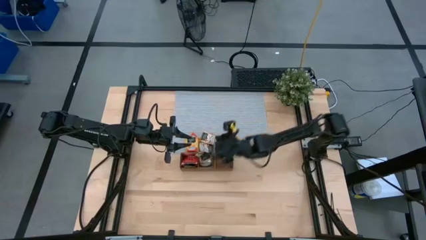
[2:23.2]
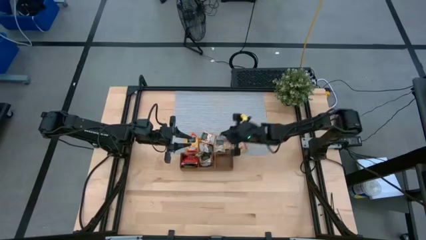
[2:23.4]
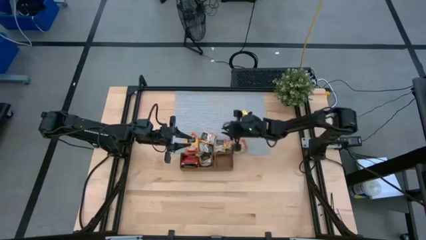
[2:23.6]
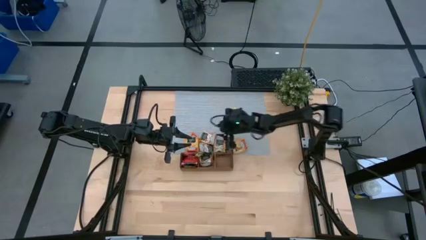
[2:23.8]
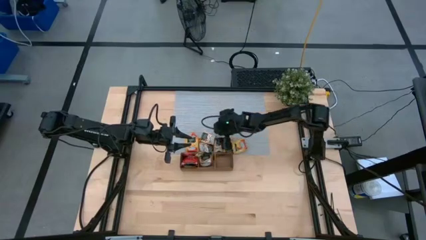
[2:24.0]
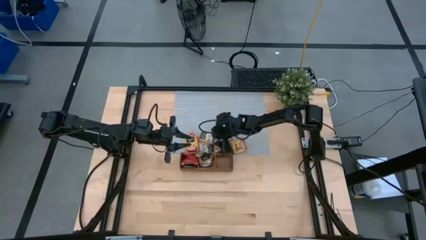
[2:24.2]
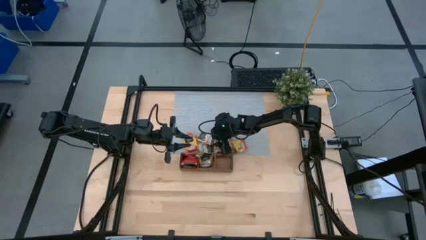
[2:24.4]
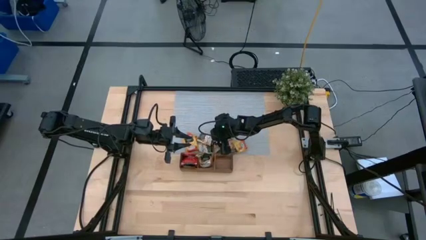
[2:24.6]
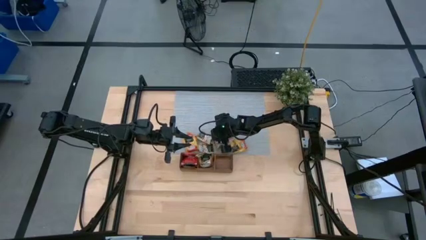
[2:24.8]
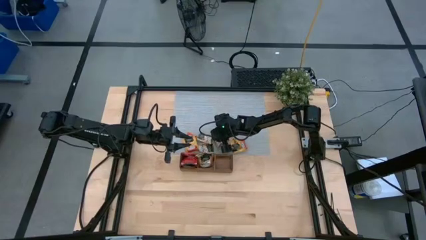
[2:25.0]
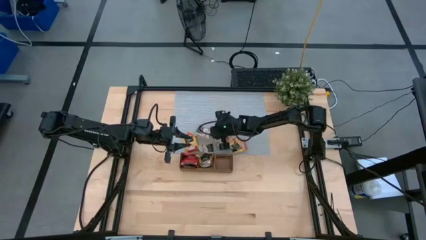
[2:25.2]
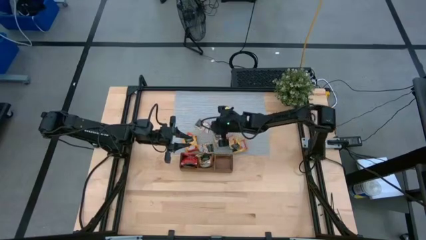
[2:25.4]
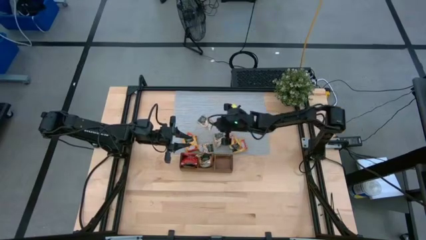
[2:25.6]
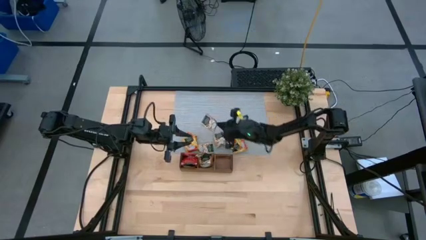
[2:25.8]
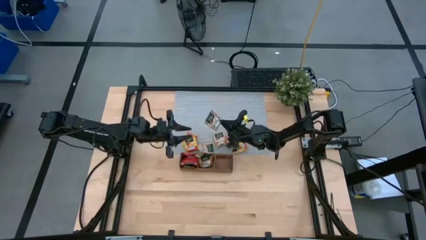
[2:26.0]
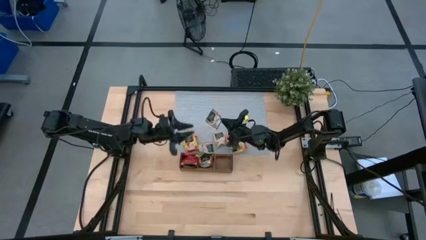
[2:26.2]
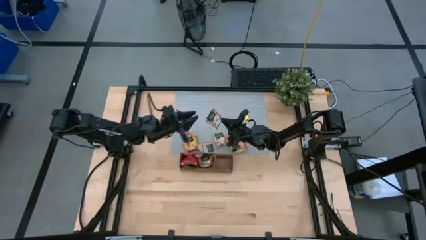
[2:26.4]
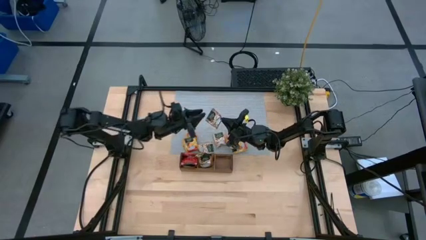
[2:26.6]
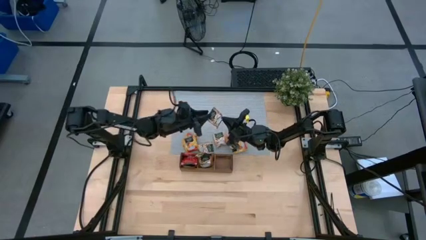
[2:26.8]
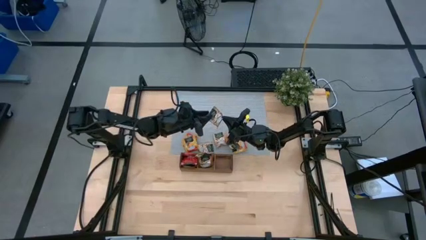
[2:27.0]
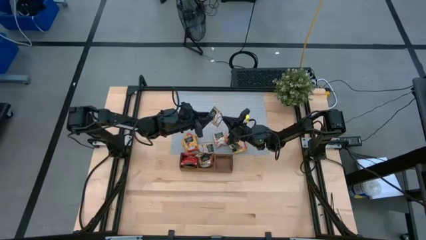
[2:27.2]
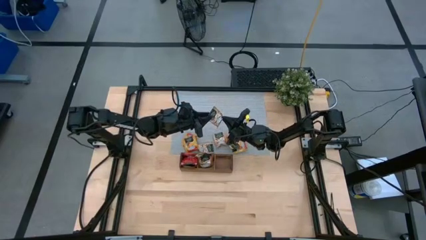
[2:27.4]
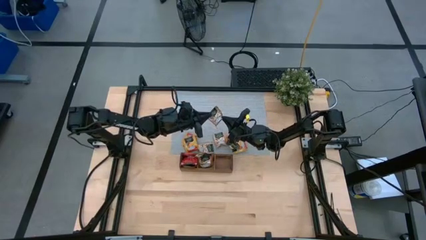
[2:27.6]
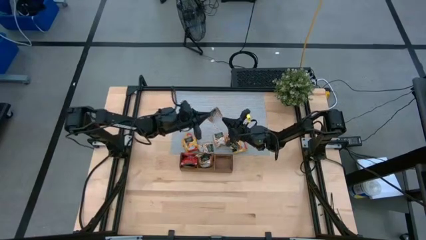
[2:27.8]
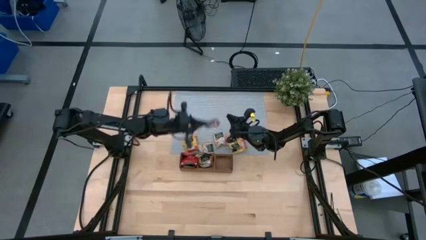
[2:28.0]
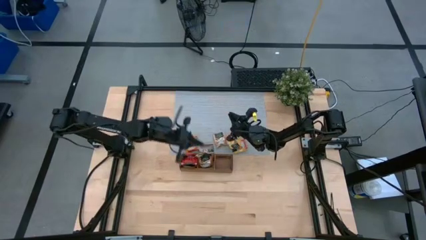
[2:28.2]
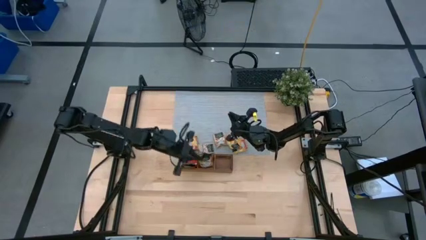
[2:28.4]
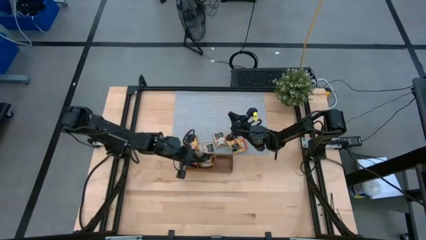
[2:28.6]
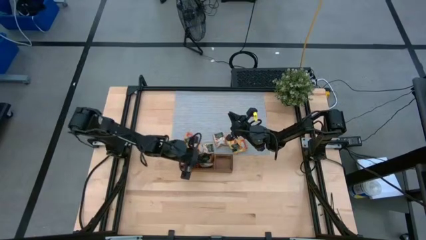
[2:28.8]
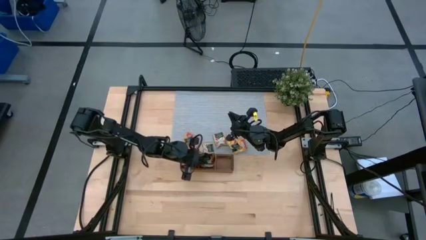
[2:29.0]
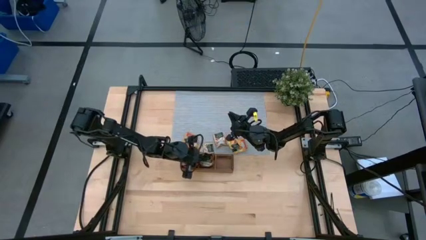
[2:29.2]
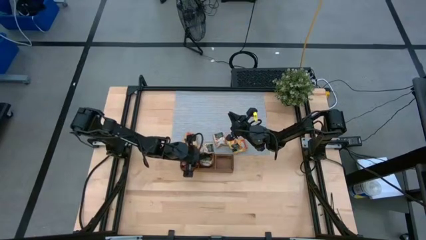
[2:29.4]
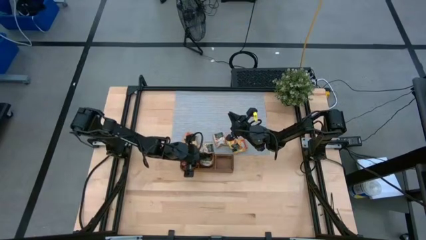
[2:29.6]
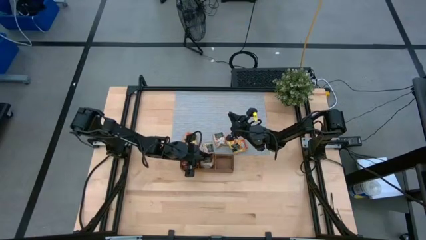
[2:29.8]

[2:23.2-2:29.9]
Task: Pick & Place Tea
Put the brown tea bag into the middle section of the wooden organizer

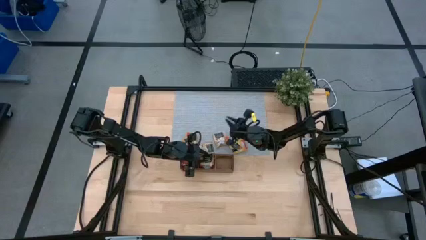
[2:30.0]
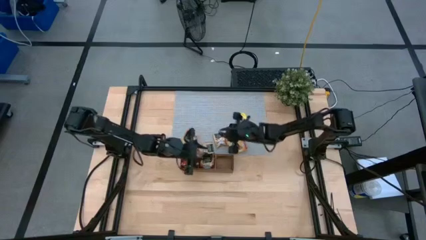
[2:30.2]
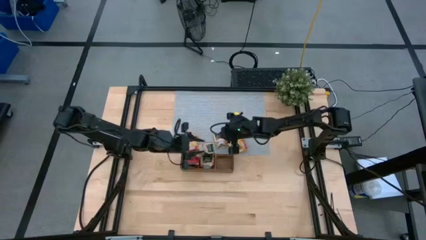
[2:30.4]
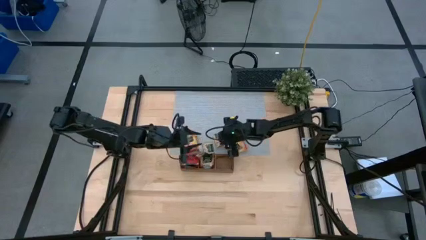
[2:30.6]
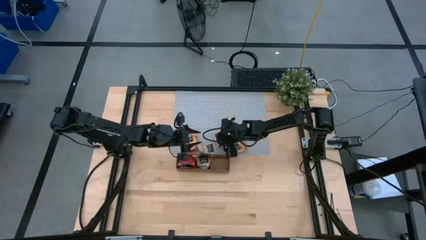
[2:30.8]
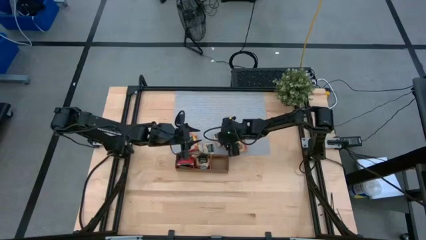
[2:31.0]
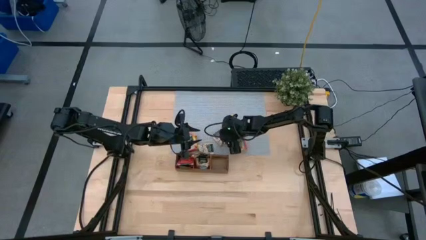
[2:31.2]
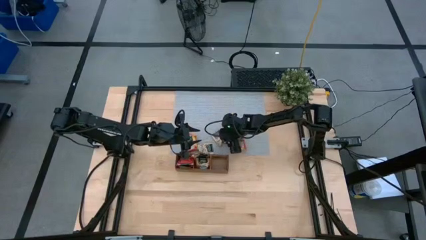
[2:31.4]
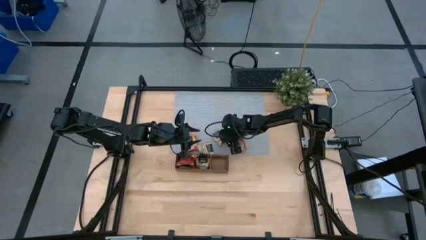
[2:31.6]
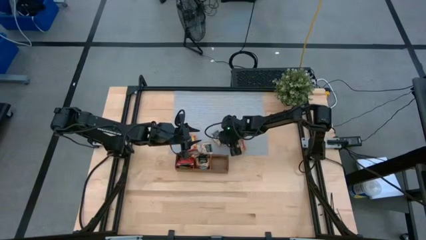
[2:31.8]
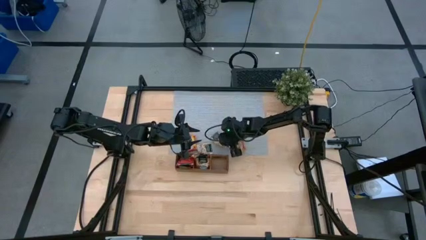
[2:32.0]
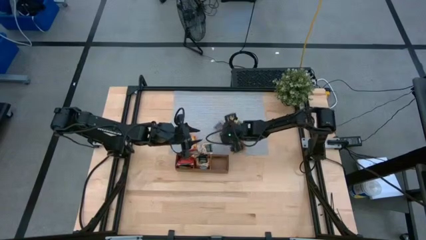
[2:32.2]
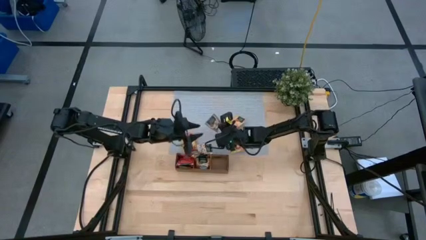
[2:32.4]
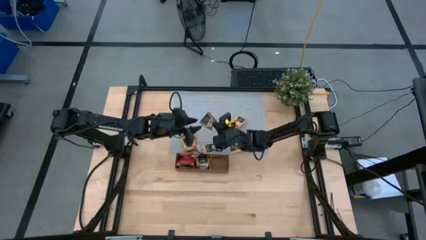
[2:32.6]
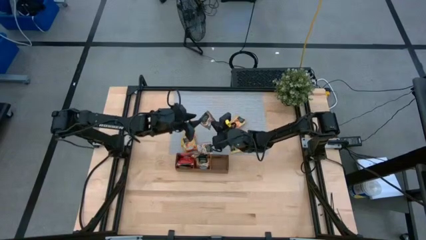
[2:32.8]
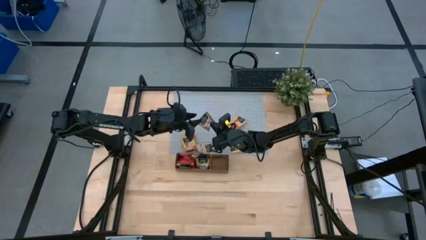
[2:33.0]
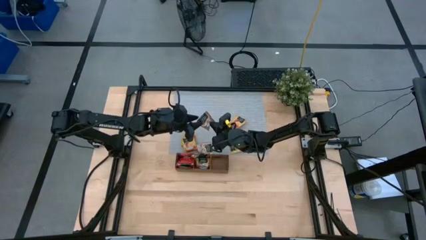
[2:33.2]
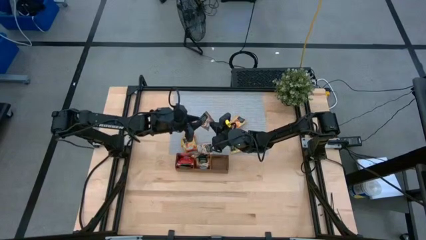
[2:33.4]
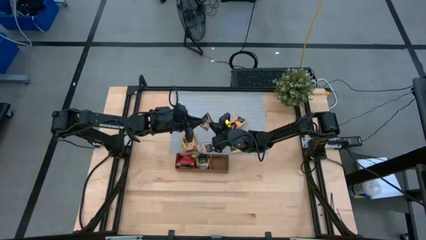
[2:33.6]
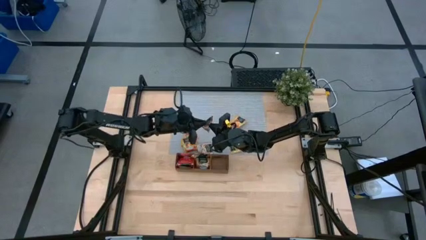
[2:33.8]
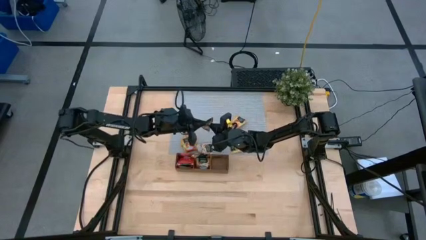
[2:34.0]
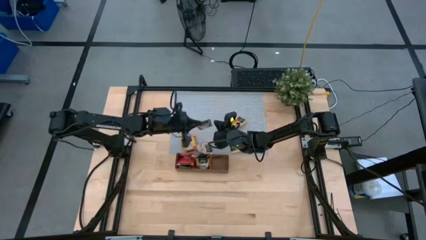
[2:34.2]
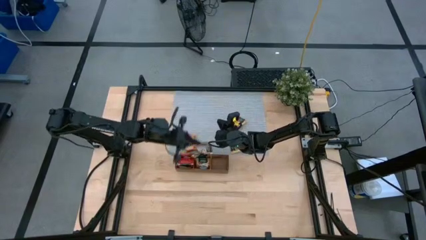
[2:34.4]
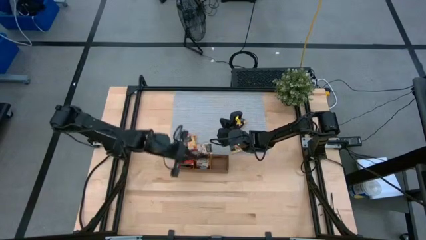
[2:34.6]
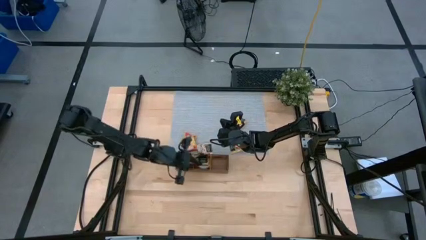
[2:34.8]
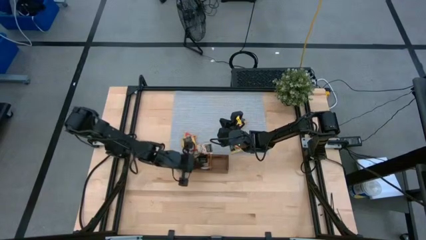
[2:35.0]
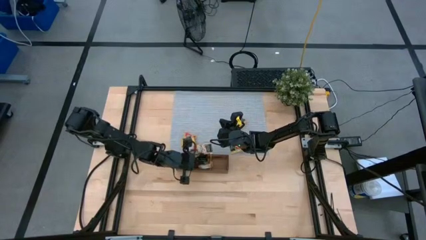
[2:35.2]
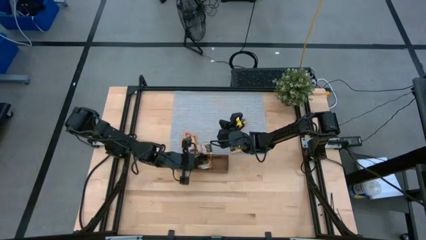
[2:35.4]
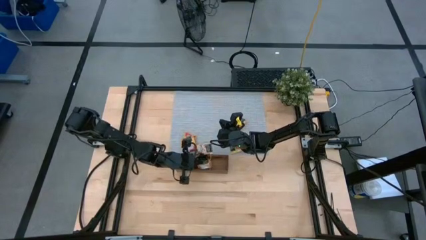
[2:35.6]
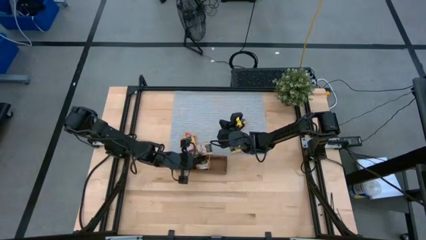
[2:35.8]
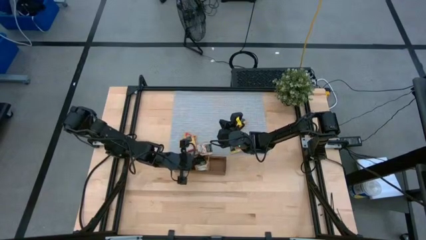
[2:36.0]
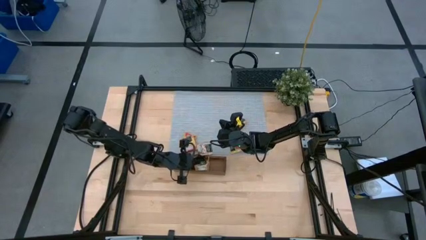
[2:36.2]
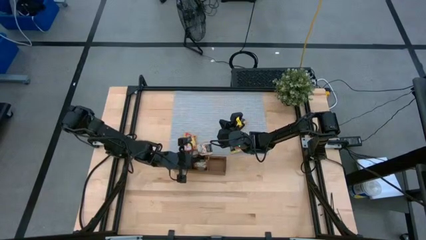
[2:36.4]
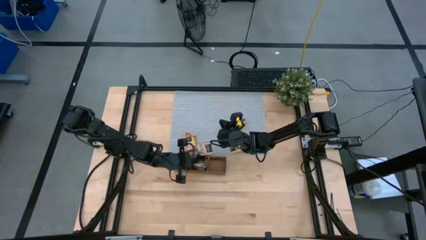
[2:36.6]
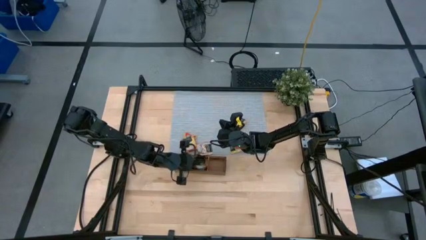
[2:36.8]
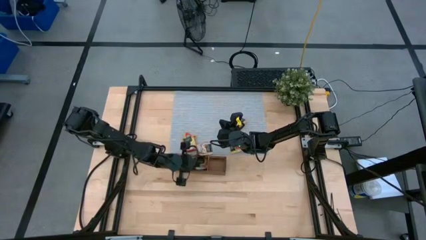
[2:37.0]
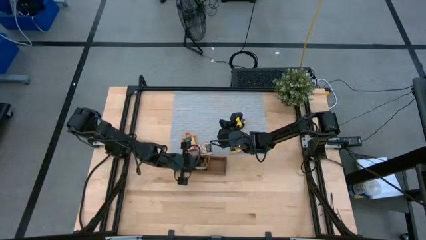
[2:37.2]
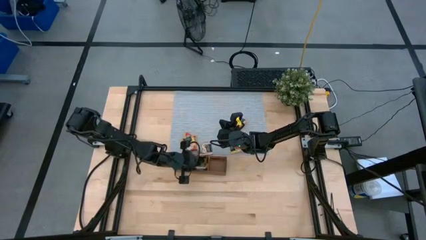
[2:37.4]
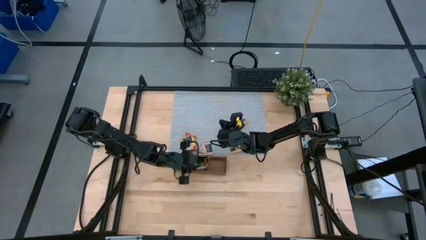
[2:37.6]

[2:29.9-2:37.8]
Put the brown tea bag into the middle section of the wooden organizer

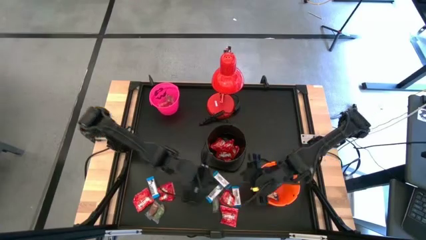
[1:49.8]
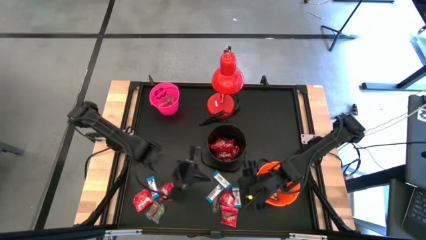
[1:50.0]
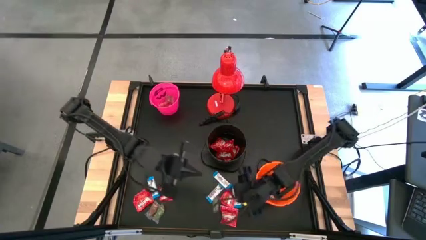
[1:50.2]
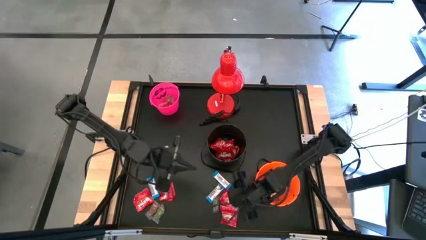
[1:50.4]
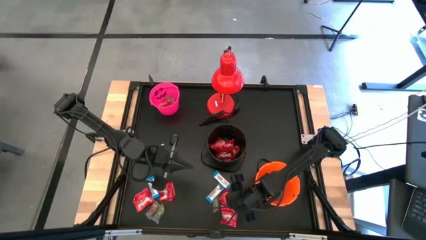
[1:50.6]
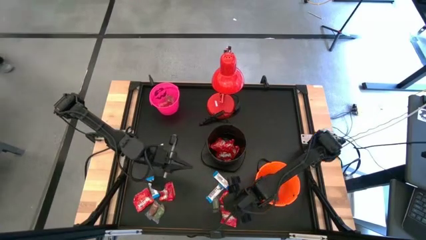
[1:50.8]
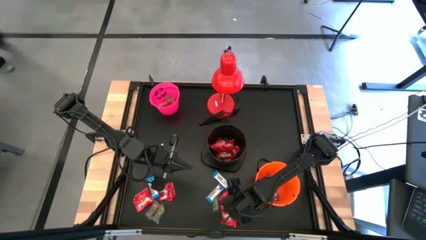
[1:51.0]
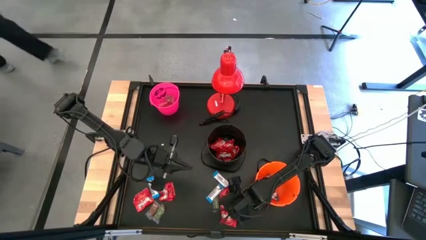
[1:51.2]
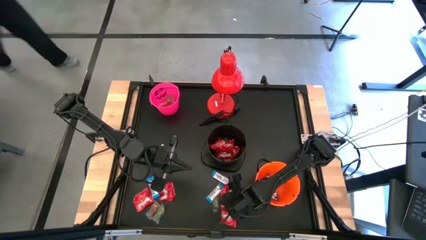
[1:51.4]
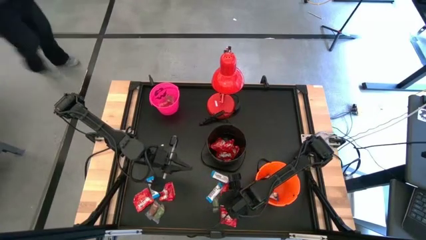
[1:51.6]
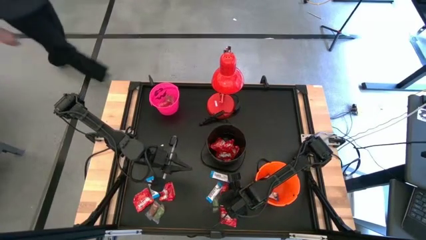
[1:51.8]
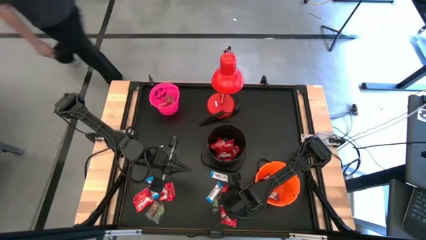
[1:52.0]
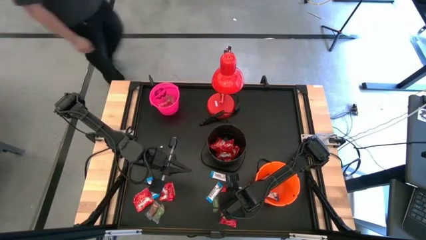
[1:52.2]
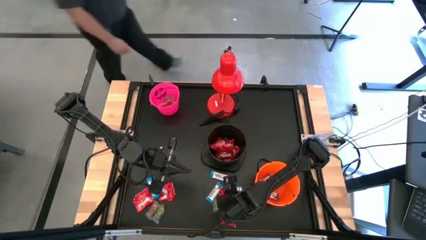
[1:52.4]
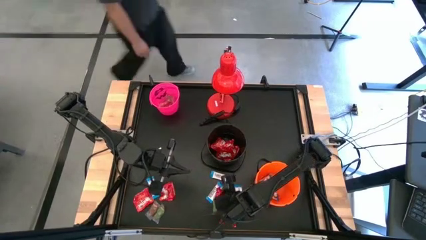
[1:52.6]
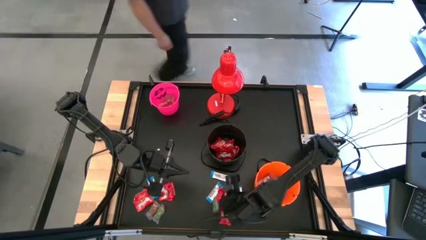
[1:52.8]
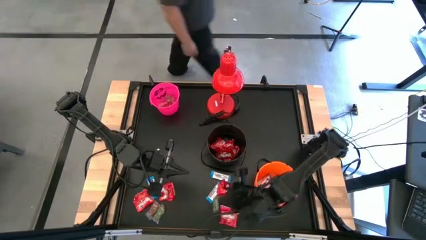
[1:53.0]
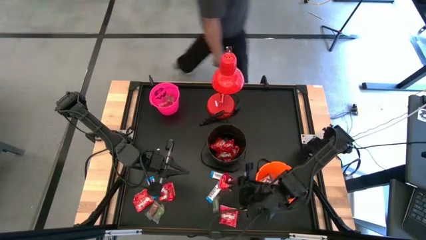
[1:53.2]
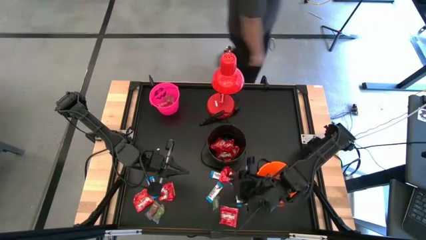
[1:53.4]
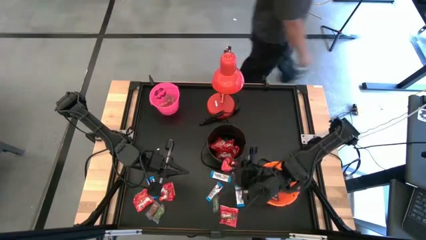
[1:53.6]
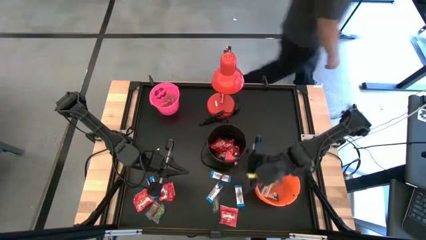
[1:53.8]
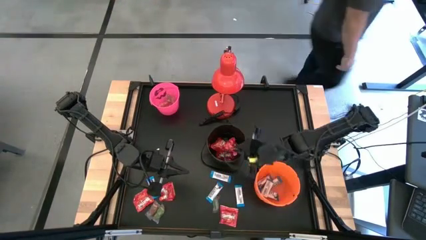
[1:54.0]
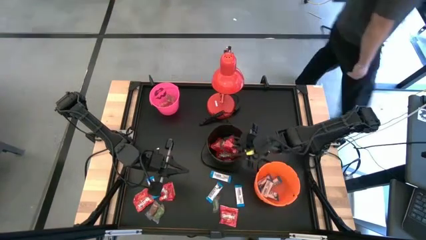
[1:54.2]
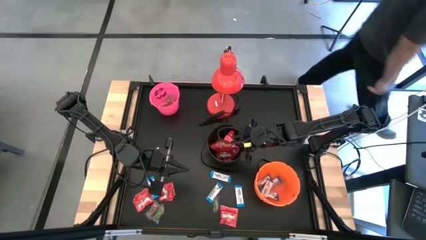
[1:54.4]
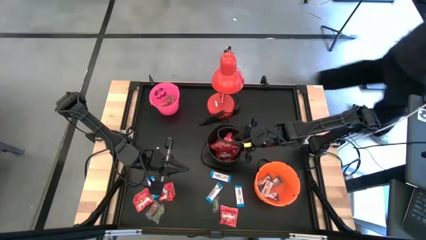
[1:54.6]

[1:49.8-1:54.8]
Task: Organize candy in baskets
Put the red candy into the black bucket
